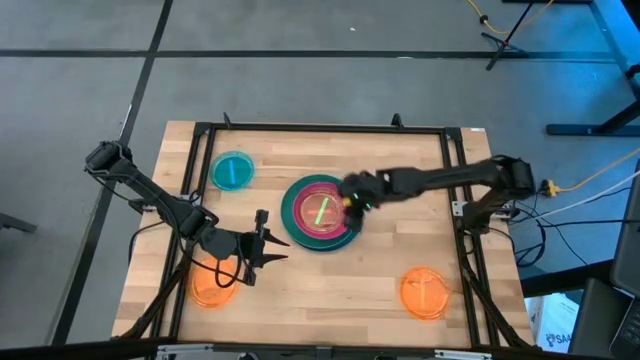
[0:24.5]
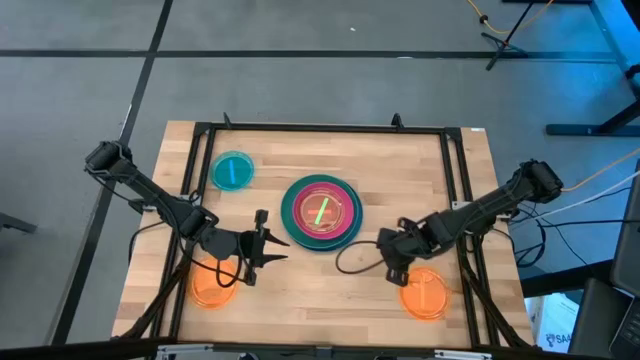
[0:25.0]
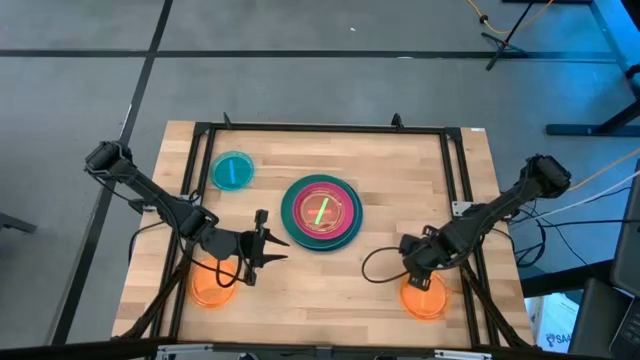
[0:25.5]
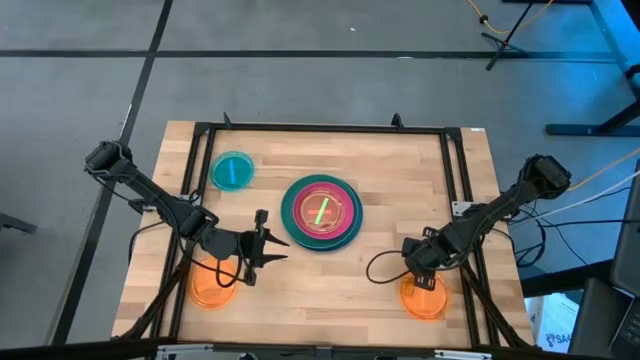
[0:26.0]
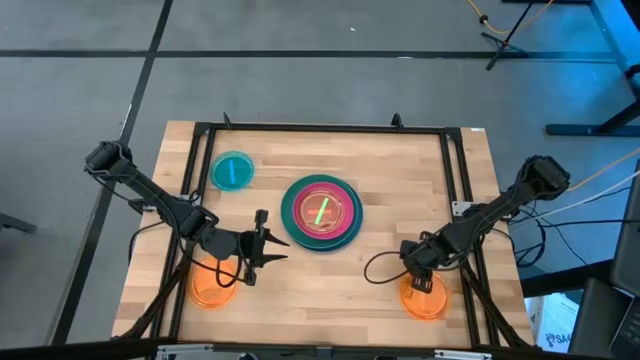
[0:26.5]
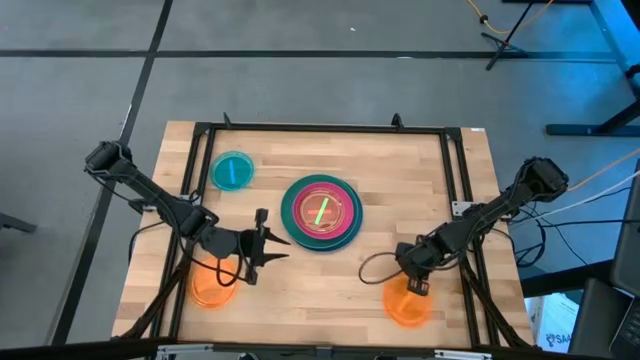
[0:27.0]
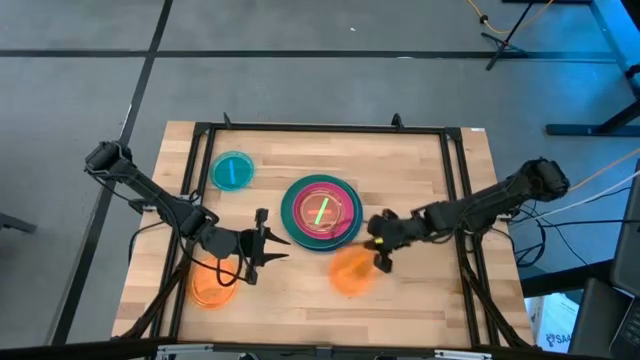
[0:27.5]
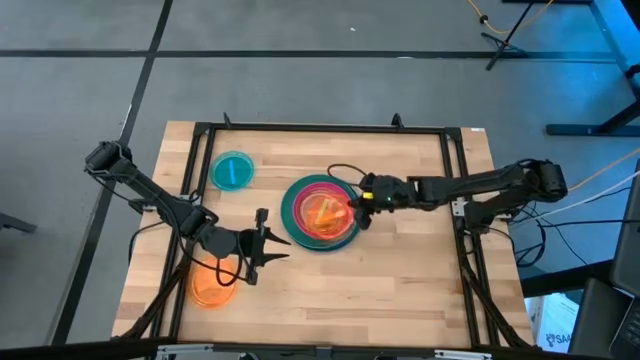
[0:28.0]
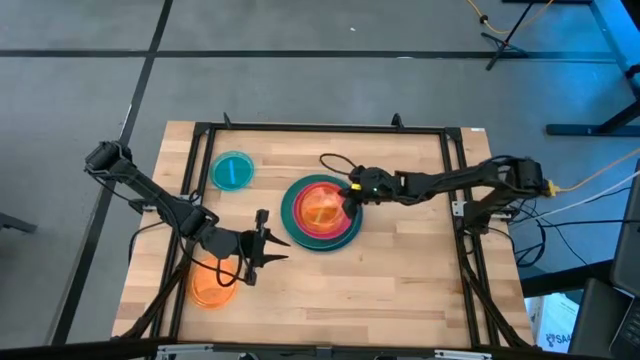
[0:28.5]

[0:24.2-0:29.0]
Task: Stack plastic plates
Stack the right transparent orange plate on top of the transparent green plate

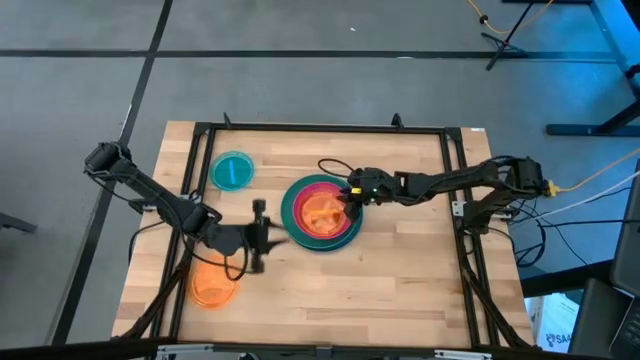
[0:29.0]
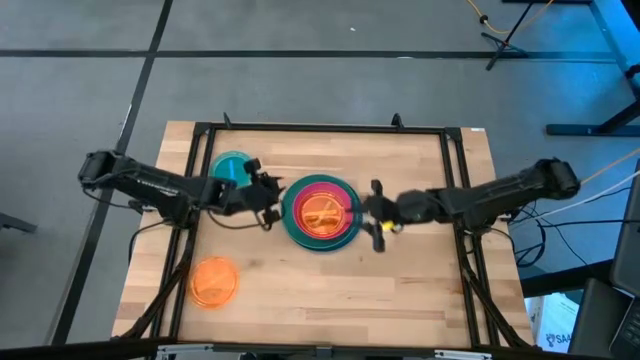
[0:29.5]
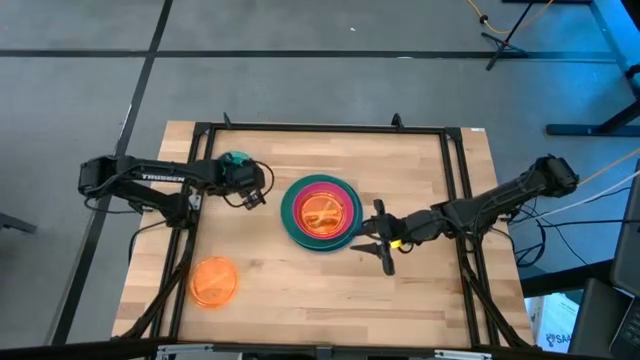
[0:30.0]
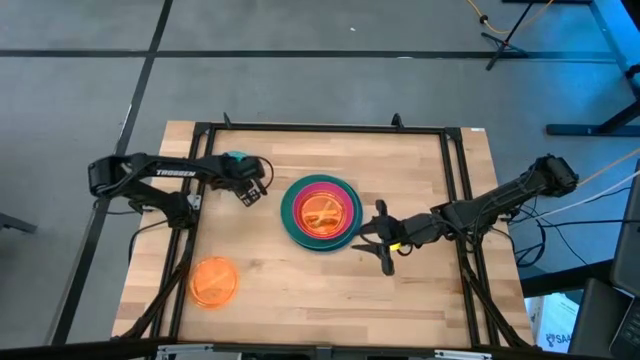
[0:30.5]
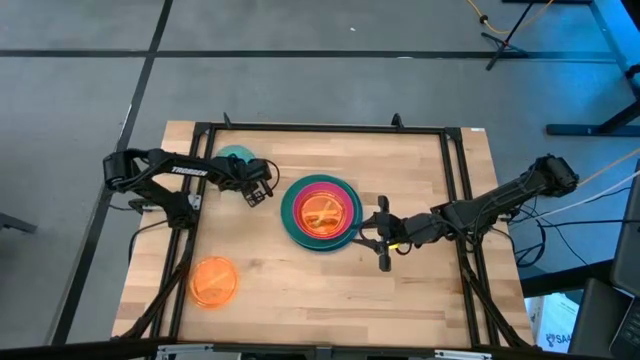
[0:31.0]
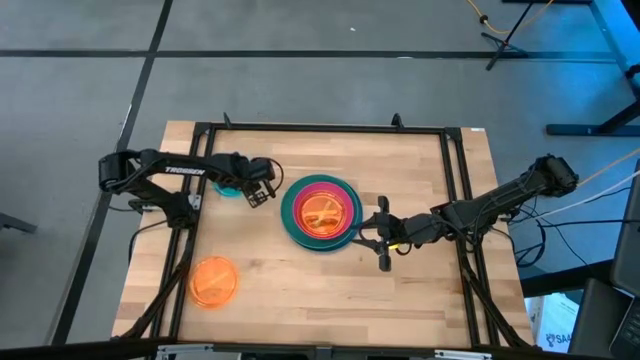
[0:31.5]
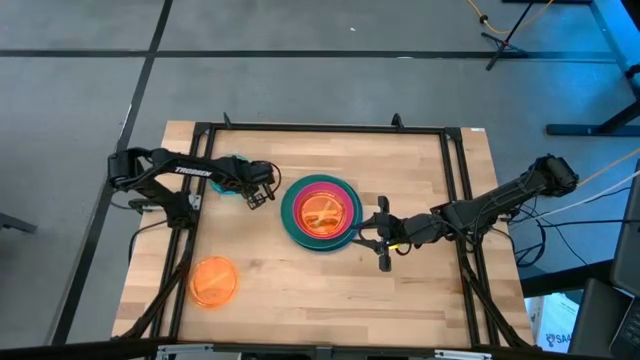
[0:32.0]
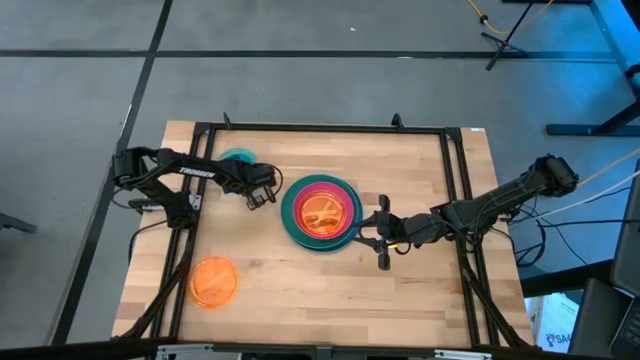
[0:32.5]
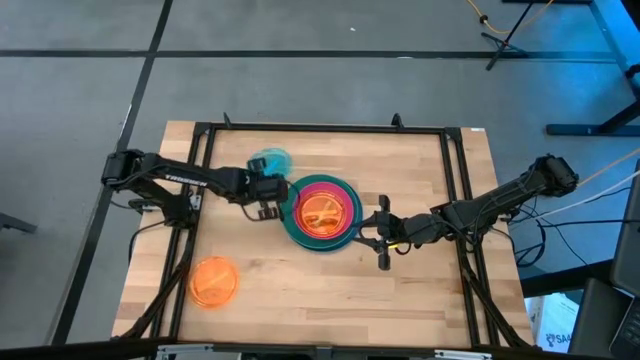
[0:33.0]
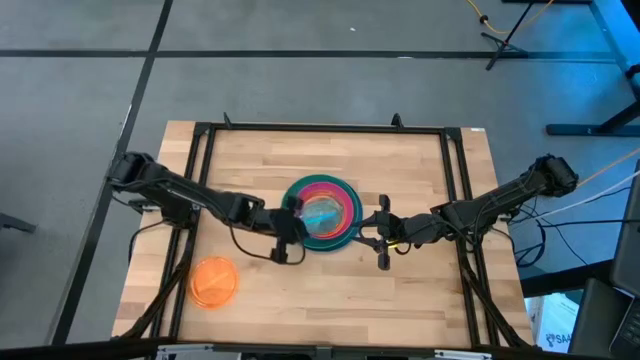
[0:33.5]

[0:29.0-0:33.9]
Stack the transparent blue plate on top of the transparent orange plate

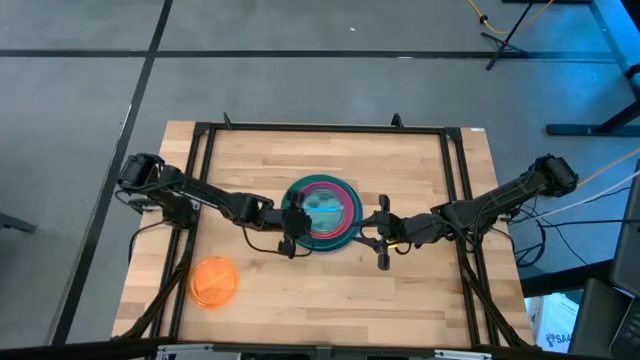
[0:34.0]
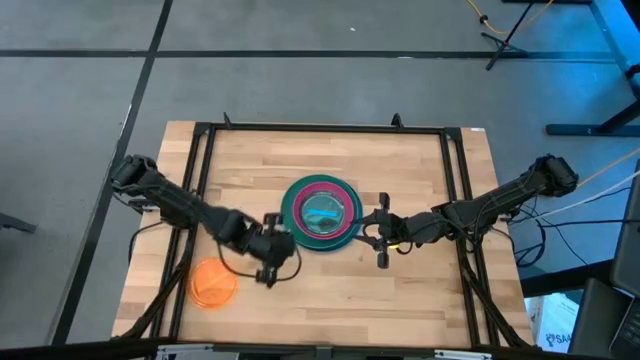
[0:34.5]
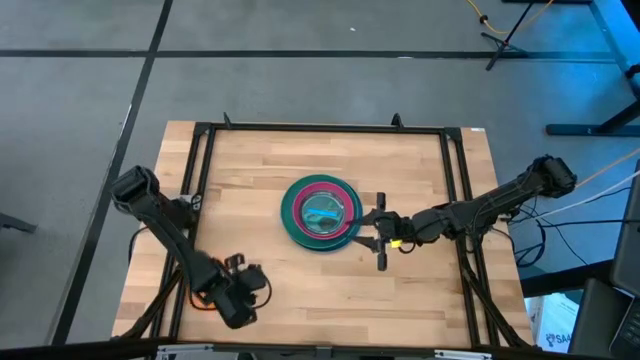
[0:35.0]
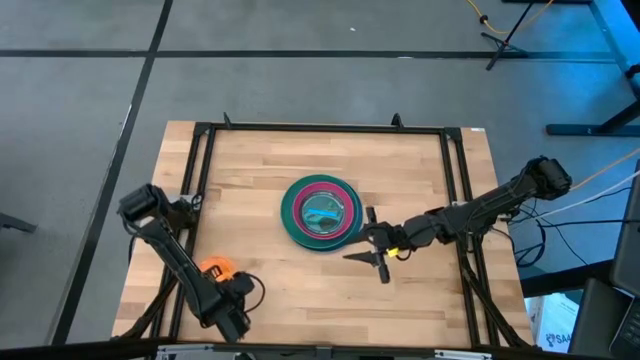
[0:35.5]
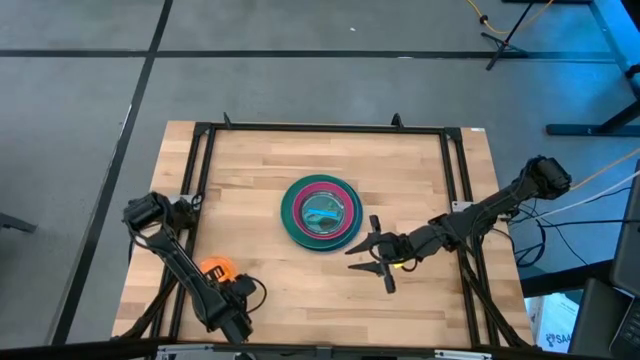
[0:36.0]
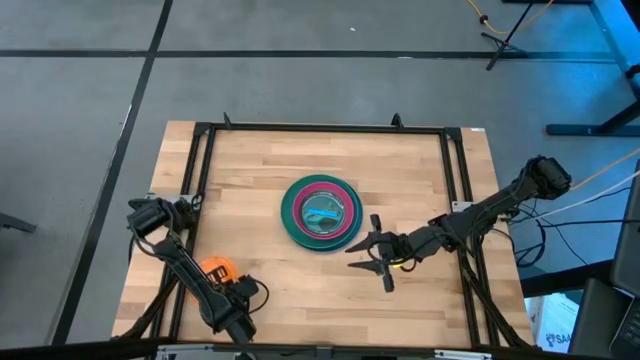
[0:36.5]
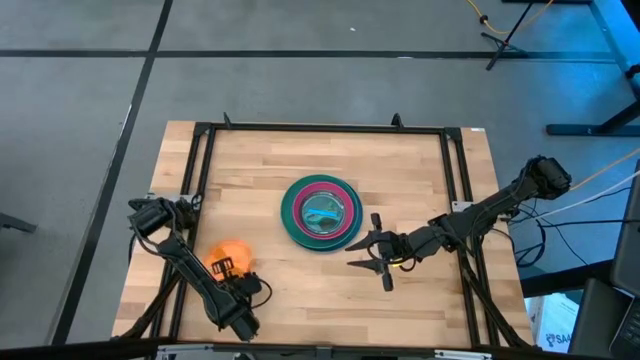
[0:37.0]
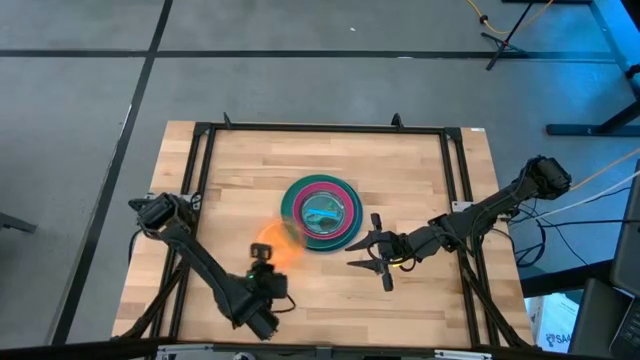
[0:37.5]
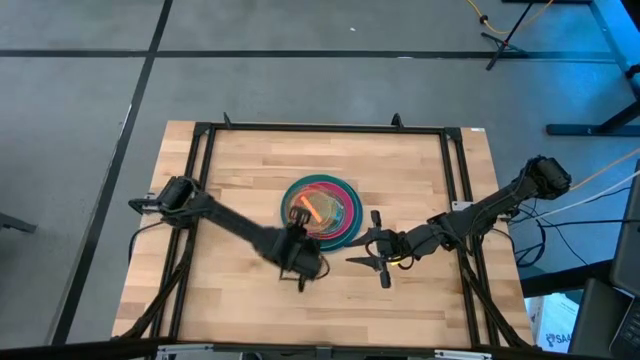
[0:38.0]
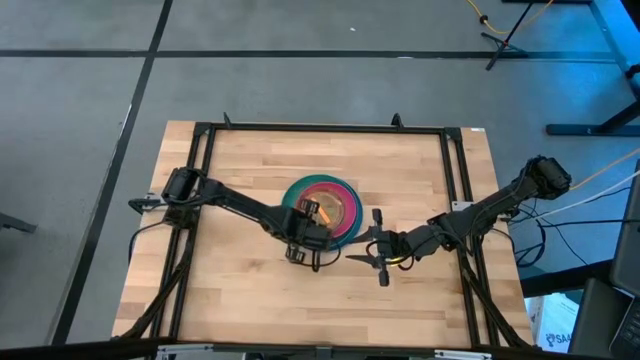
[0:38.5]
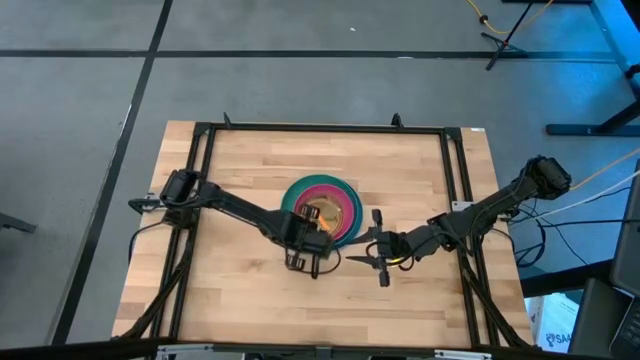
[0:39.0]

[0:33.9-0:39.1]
Stack the transparent orange plate on top of the transparent blue plate

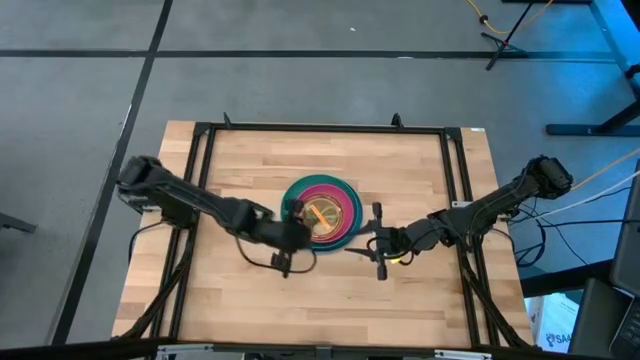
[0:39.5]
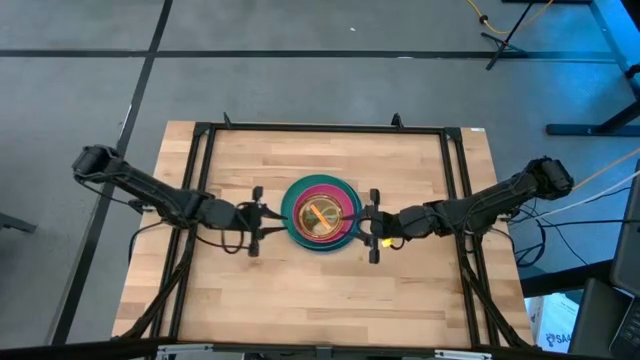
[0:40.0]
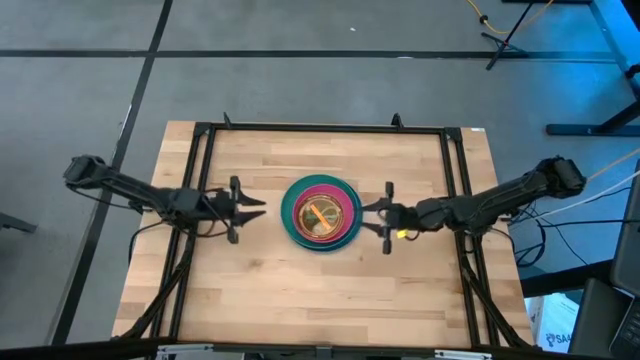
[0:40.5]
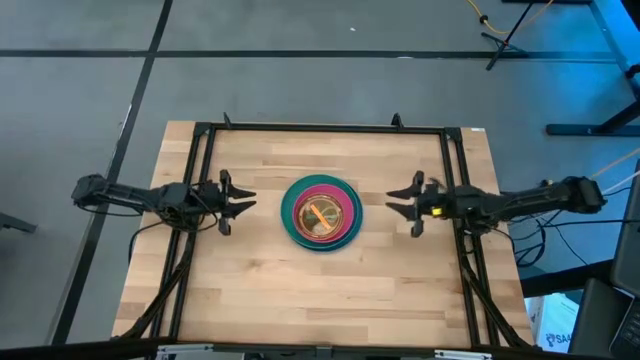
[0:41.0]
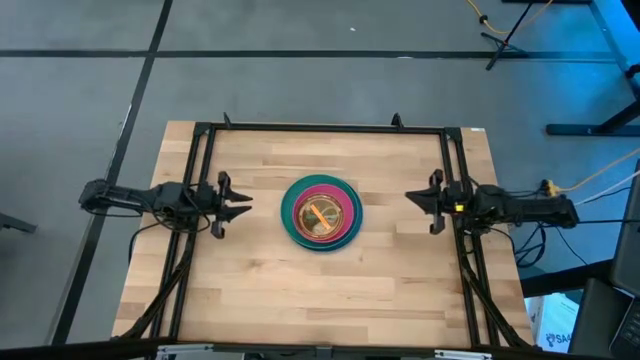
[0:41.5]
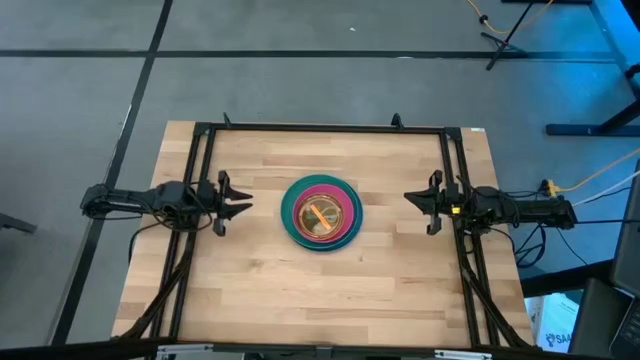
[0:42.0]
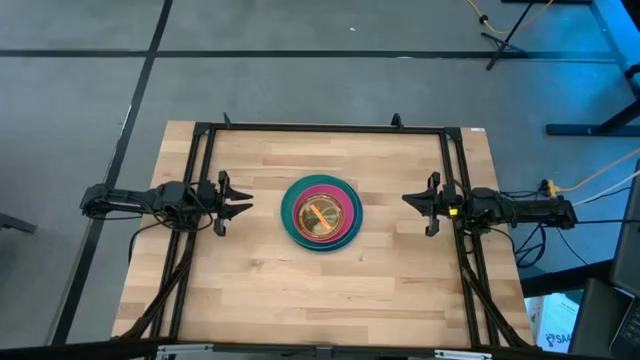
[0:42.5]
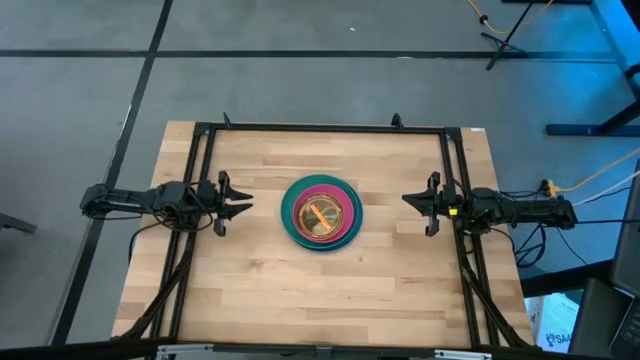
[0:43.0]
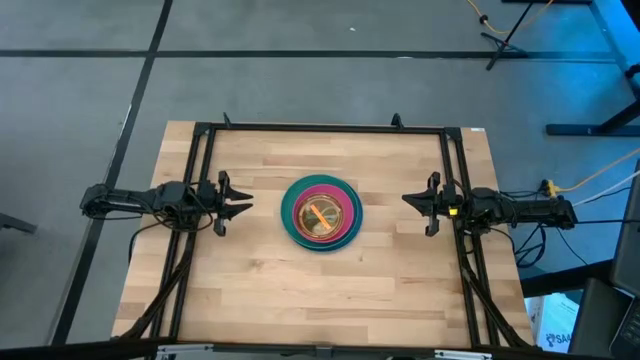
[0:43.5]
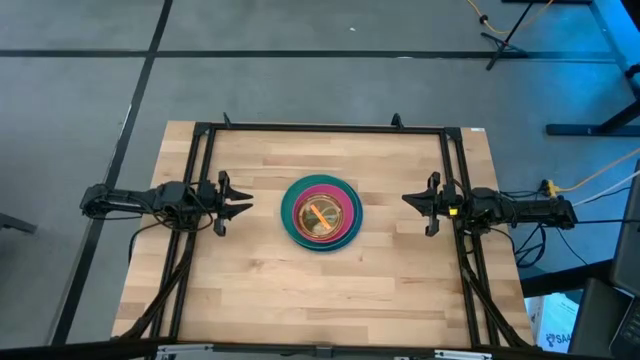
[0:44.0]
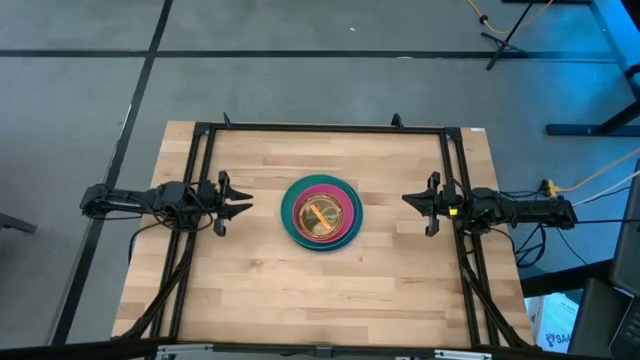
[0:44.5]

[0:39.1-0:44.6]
Return to Home Position
